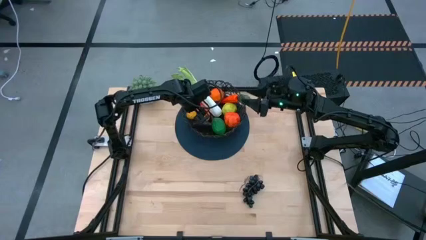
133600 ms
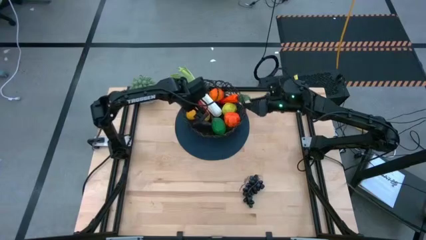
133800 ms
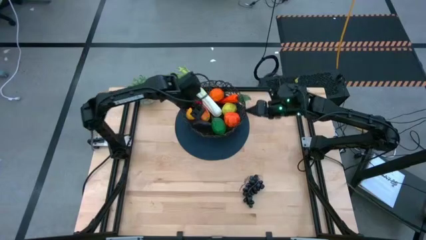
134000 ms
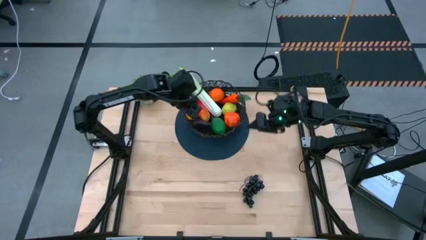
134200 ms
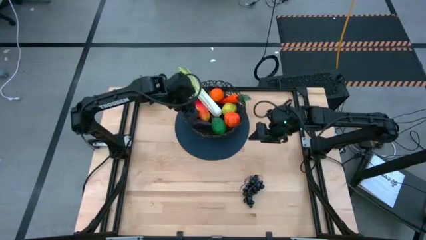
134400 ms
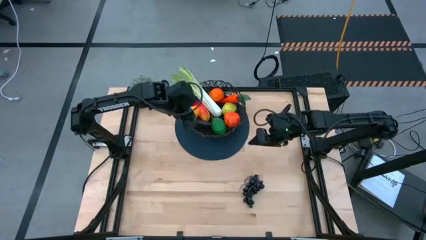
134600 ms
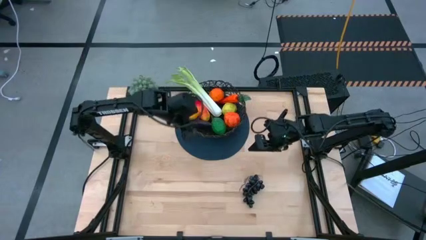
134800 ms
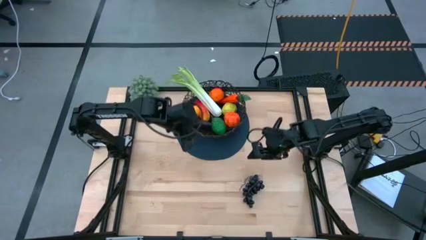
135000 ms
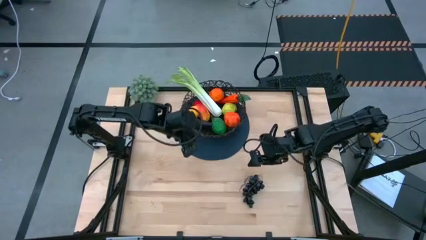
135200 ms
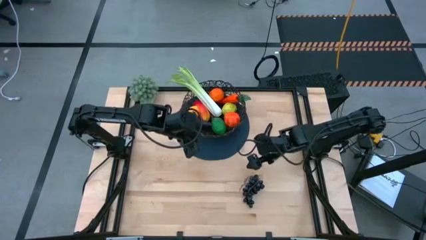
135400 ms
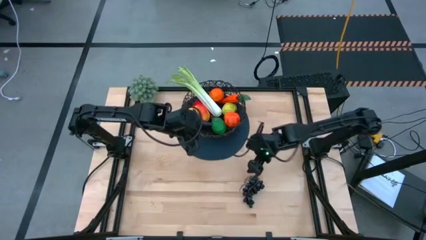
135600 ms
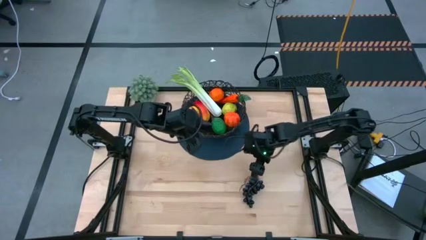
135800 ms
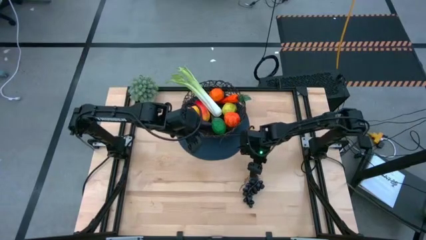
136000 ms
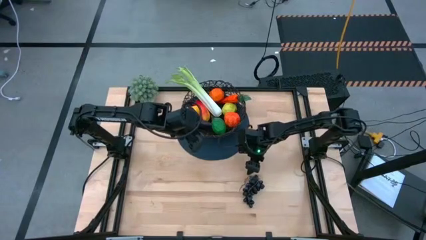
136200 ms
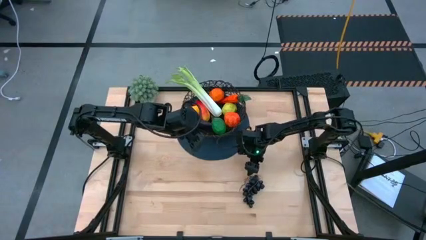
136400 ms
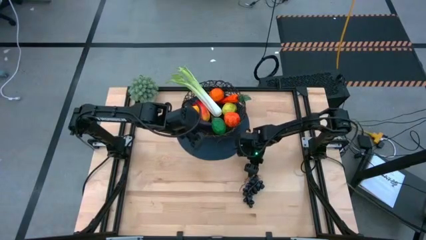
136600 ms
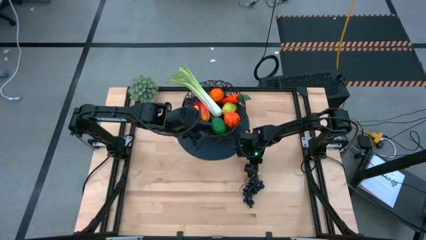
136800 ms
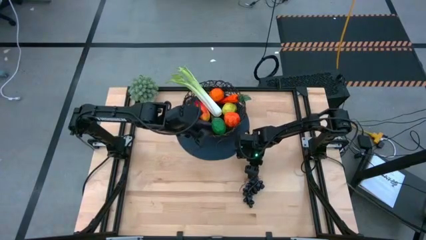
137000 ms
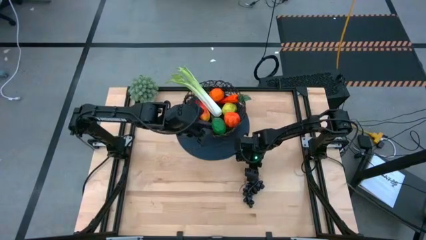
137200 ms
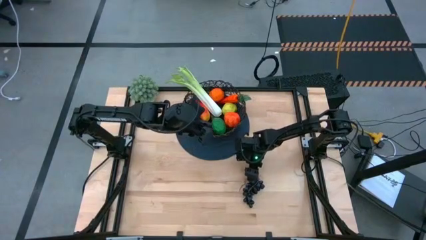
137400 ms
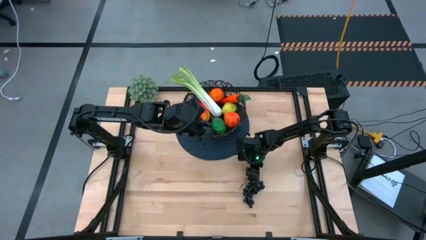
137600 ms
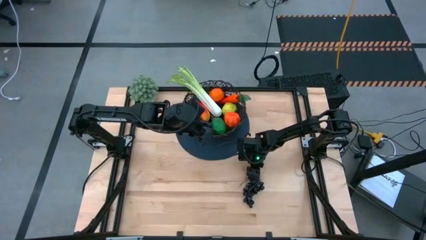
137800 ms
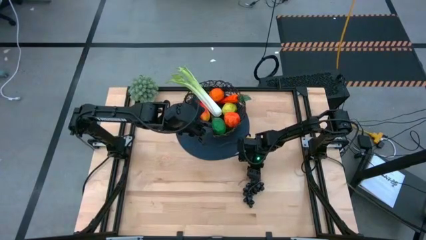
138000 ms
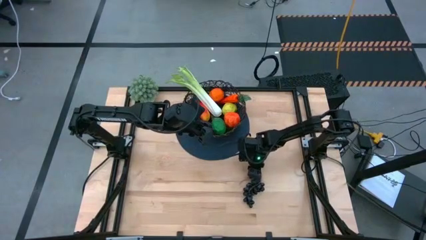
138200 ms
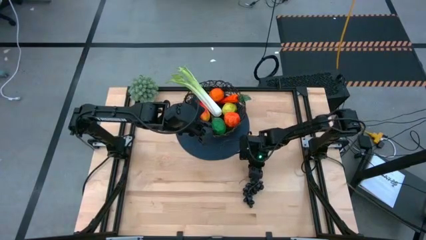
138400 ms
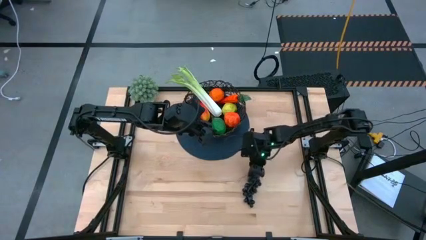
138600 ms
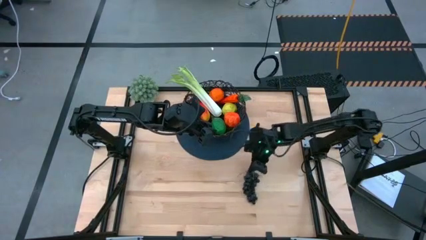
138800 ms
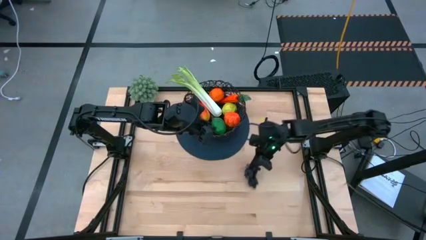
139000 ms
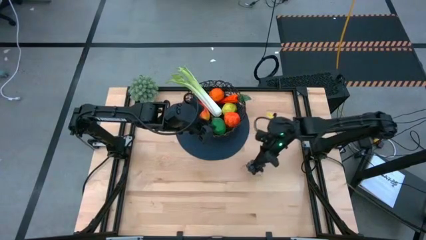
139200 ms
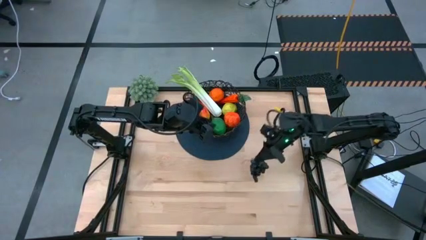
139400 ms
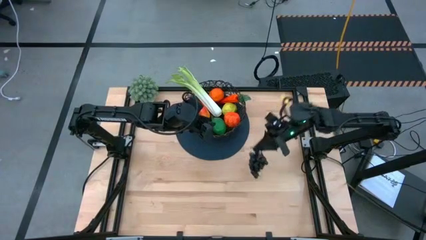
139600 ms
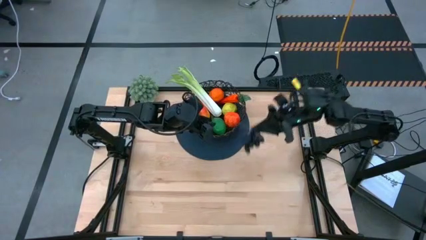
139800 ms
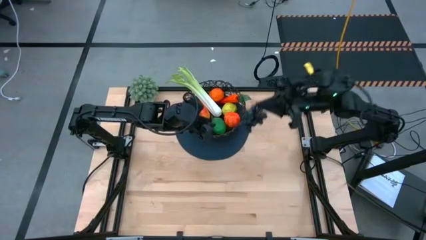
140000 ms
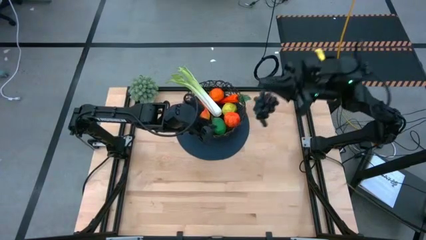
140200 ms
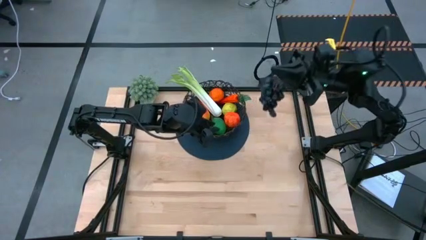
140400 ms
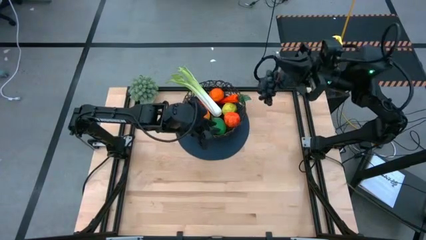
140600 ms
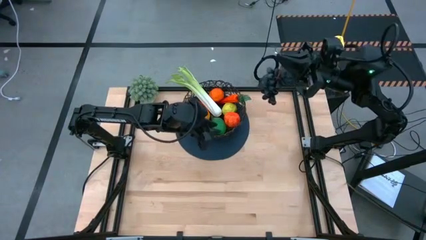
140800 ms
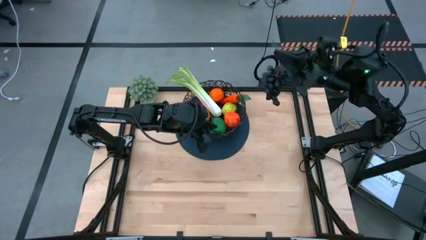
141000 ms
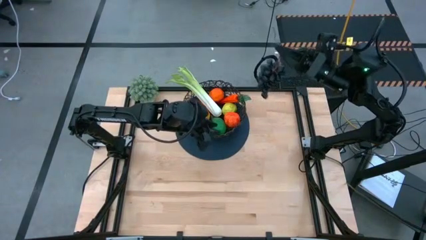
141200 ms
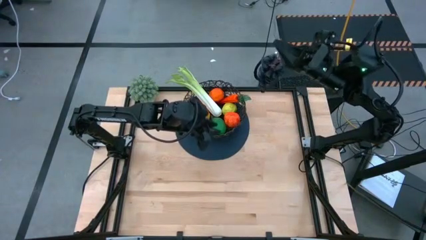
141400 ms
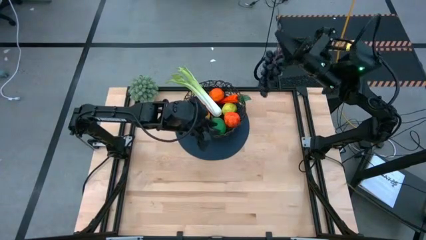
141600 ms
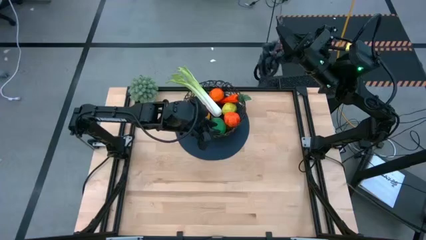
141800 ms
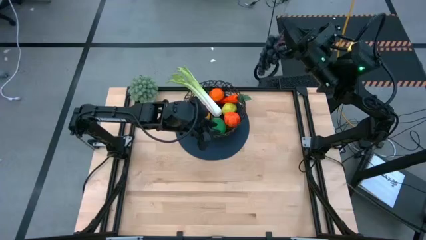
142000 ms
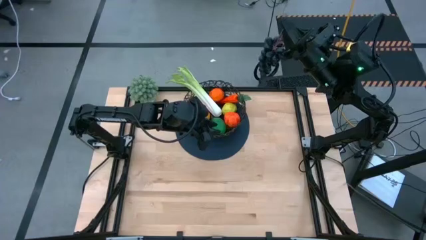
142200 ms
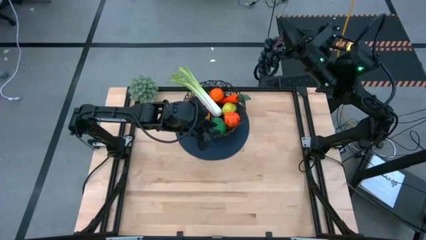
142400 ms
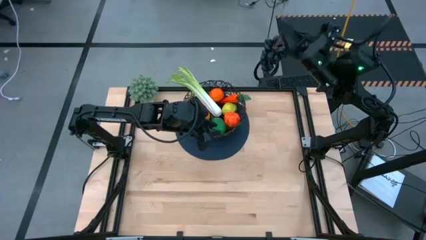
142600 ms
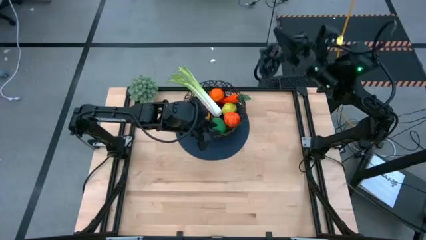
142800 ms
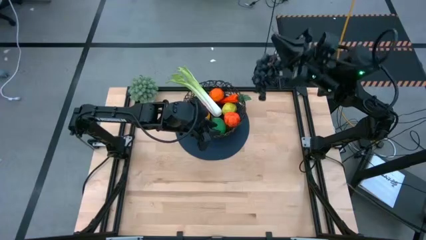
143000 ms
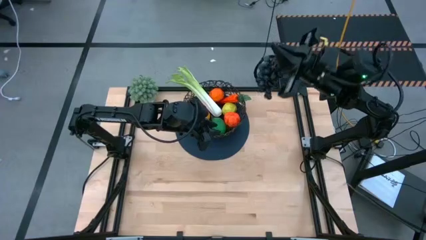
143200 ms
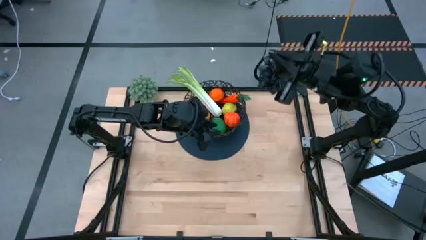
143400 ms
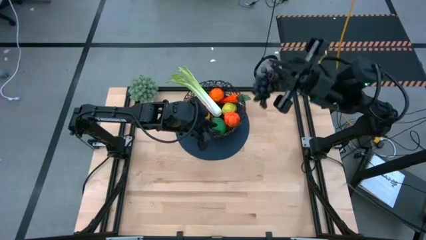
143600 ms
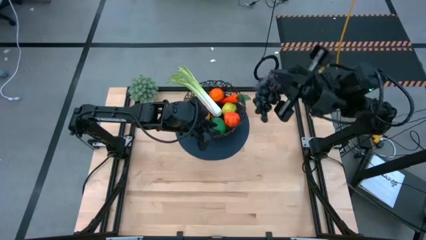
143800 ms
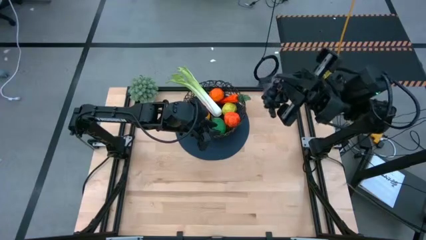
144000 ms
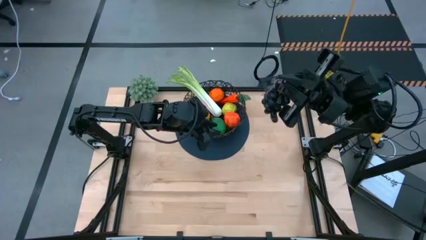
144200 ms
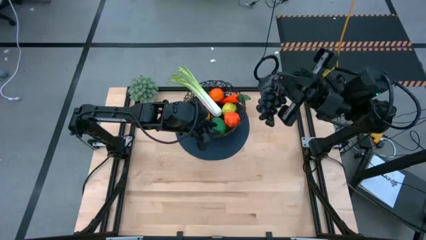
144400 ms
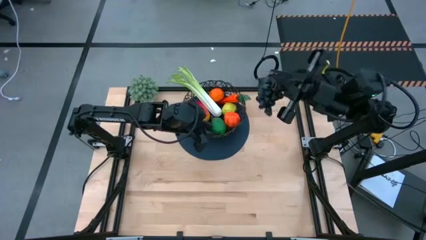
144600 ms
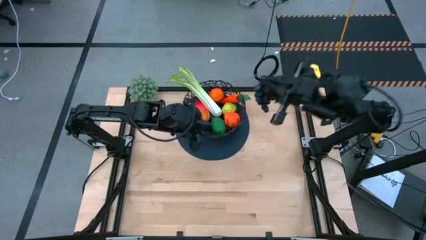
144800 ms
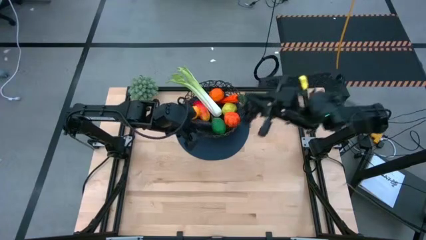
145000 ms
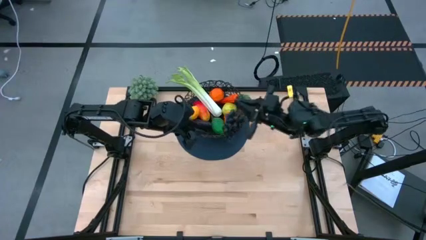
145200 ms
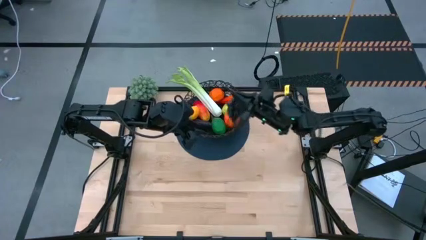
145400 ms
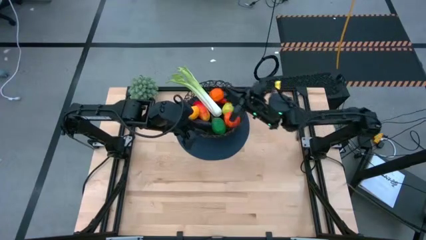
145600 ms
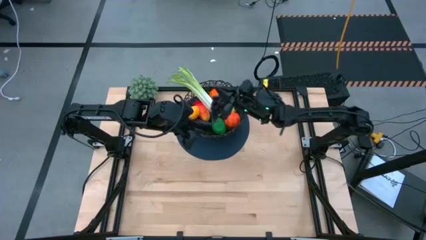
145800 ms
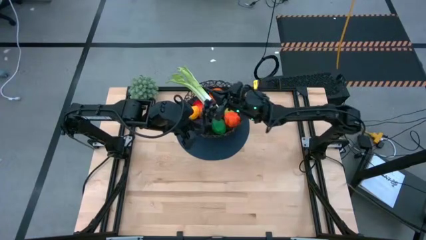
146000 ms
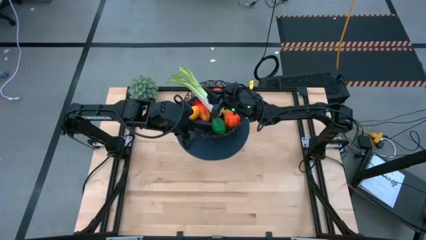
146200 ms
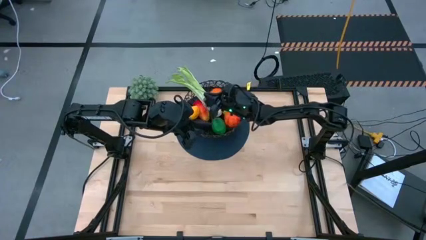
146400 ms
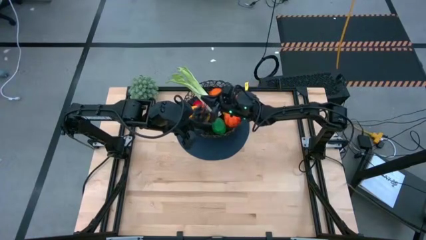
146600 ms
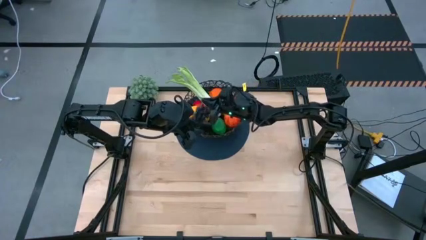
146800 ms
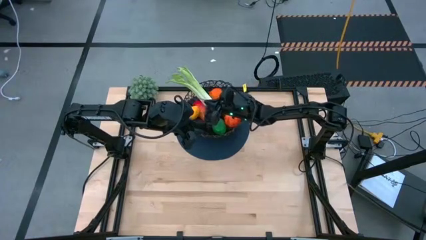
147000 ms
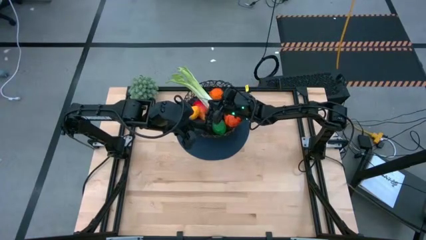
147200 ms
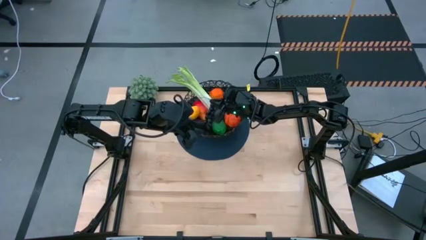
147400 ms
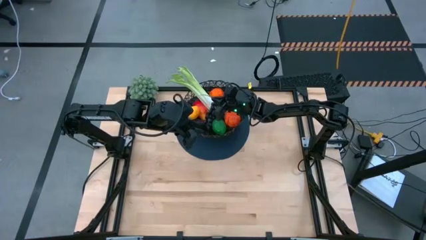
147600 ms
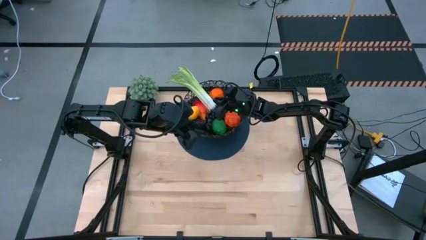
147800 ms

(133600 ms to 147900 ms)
Task: Build produce basket
Put the black and blue grapes into the wire basket
